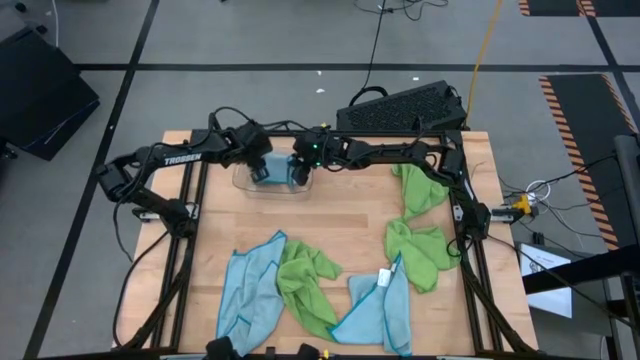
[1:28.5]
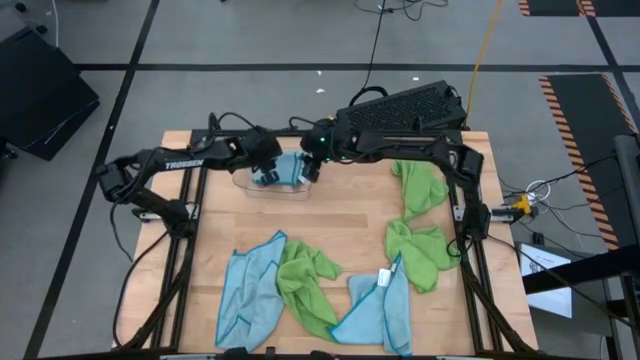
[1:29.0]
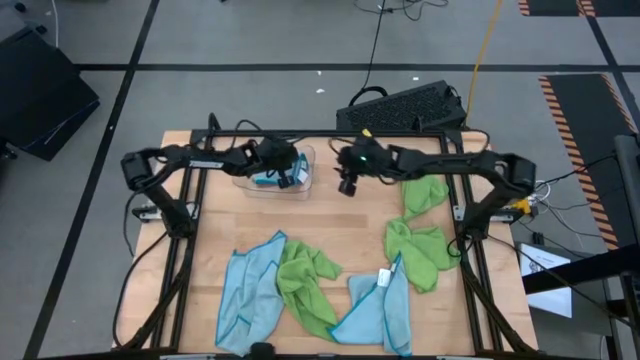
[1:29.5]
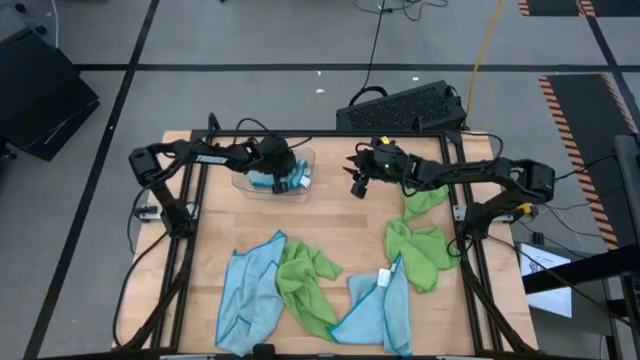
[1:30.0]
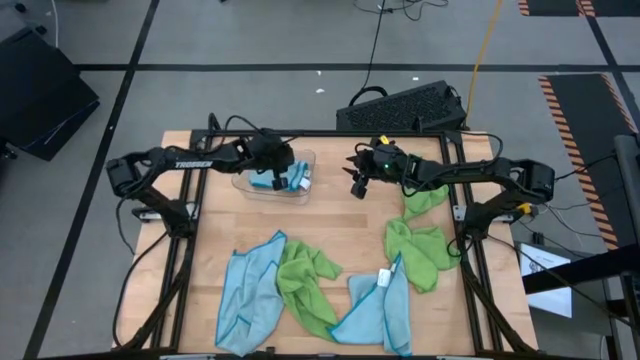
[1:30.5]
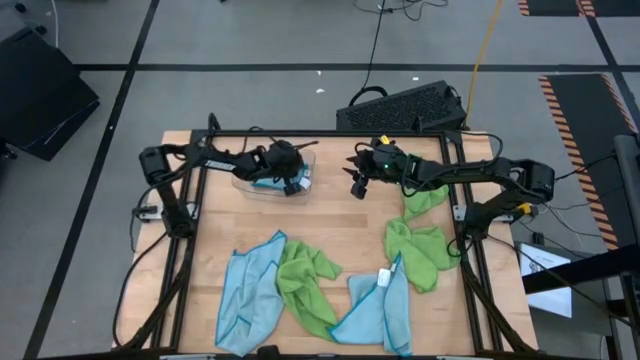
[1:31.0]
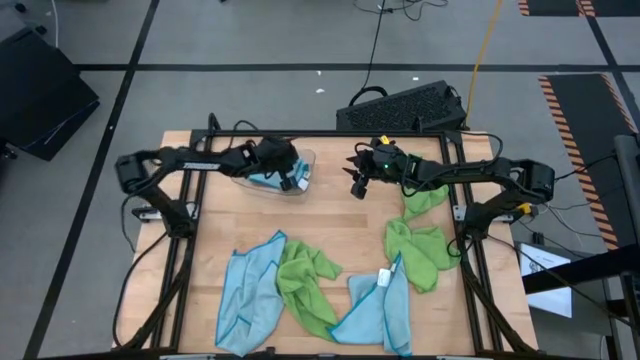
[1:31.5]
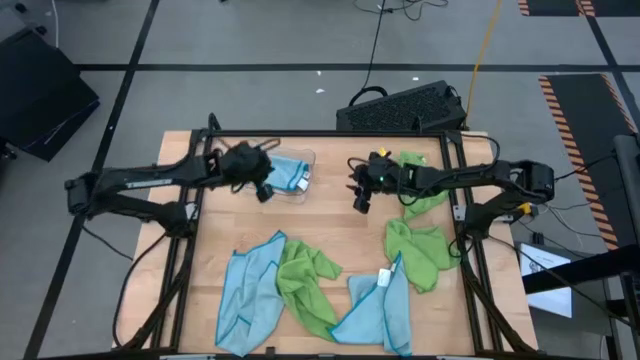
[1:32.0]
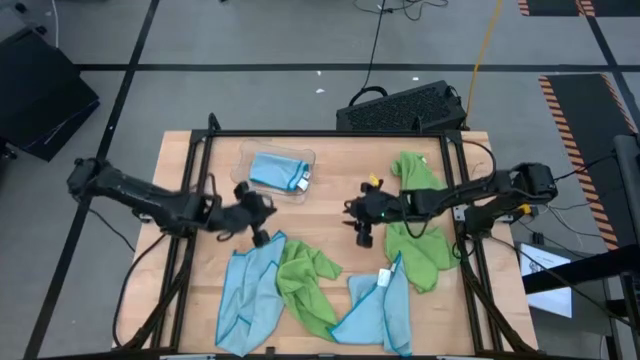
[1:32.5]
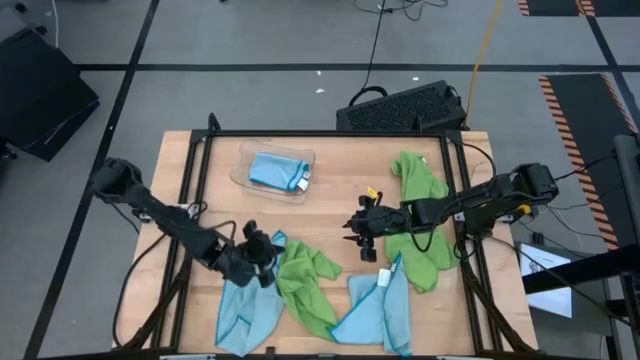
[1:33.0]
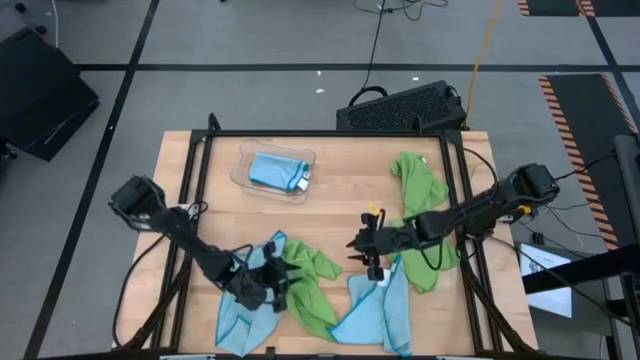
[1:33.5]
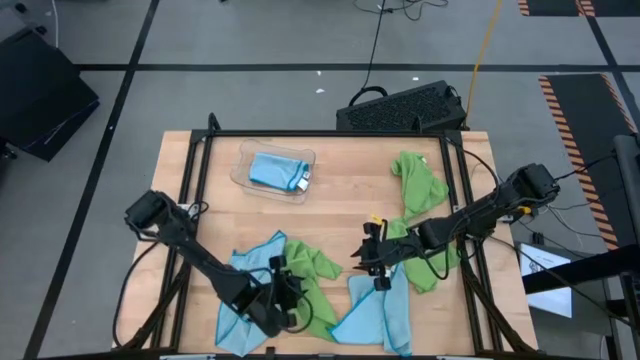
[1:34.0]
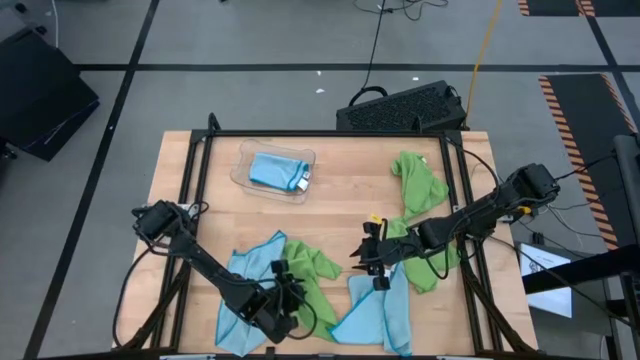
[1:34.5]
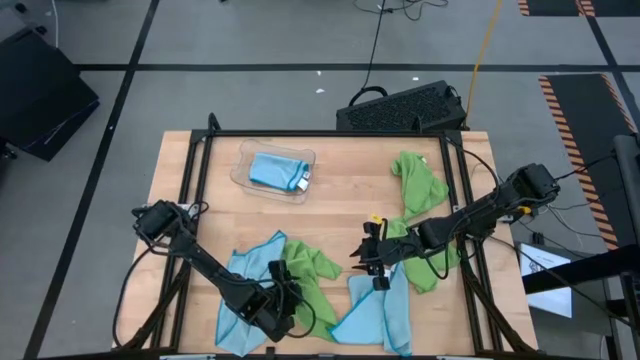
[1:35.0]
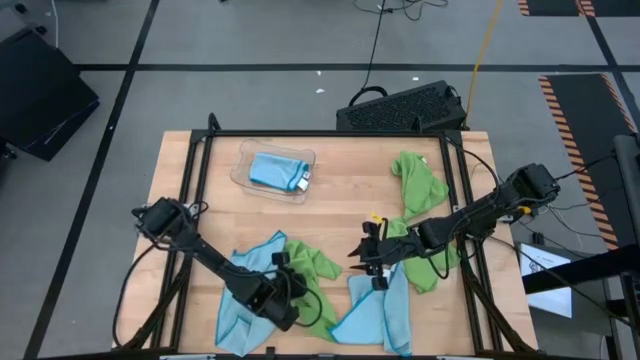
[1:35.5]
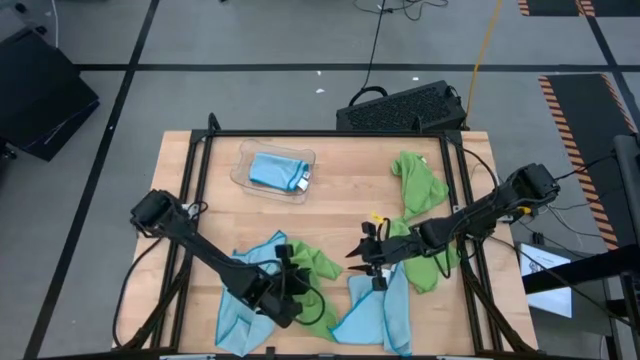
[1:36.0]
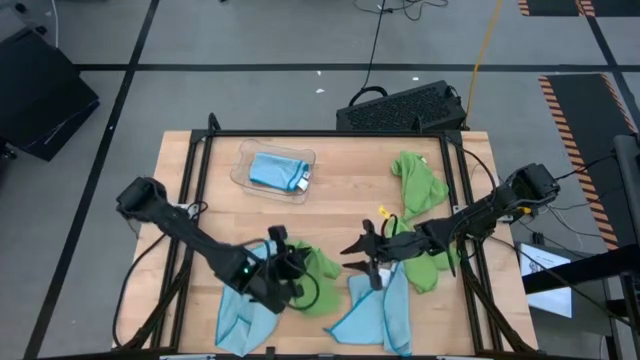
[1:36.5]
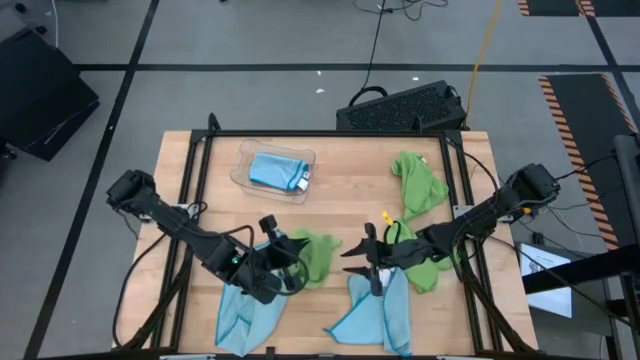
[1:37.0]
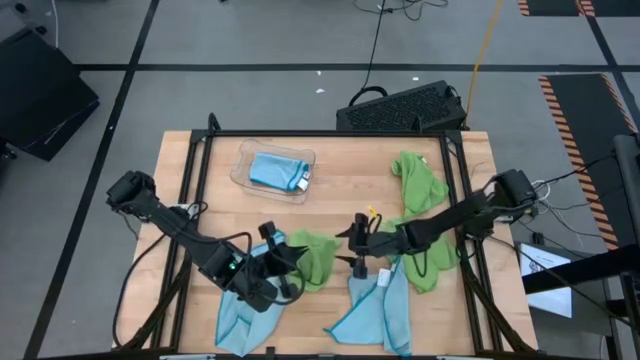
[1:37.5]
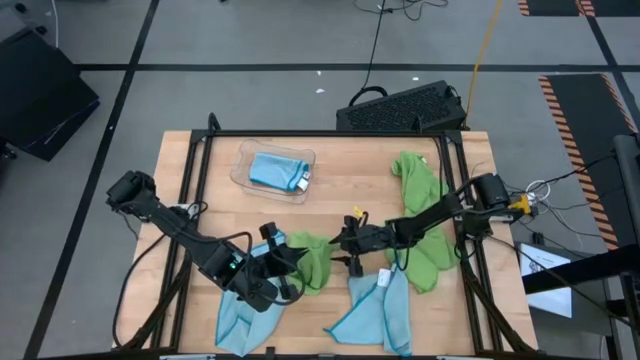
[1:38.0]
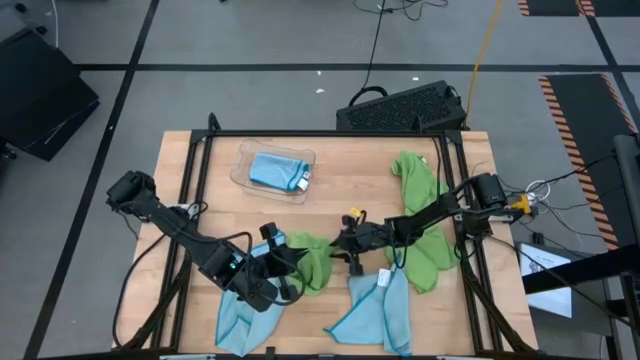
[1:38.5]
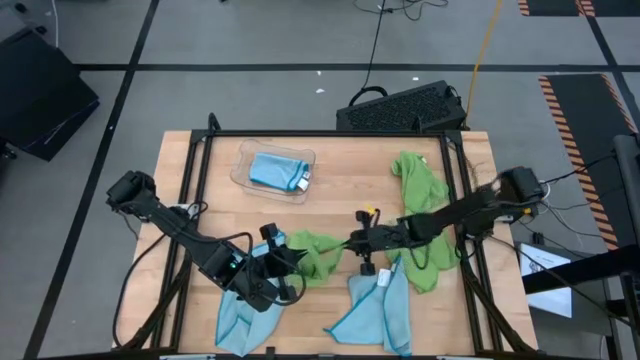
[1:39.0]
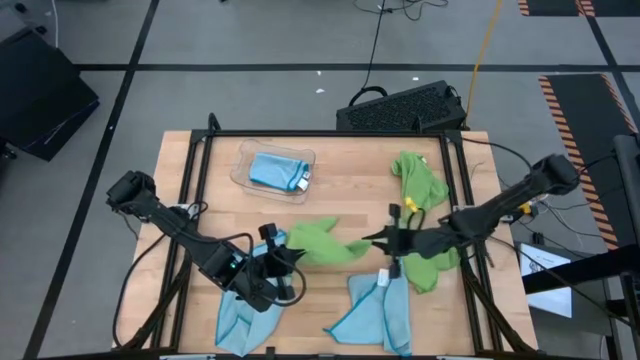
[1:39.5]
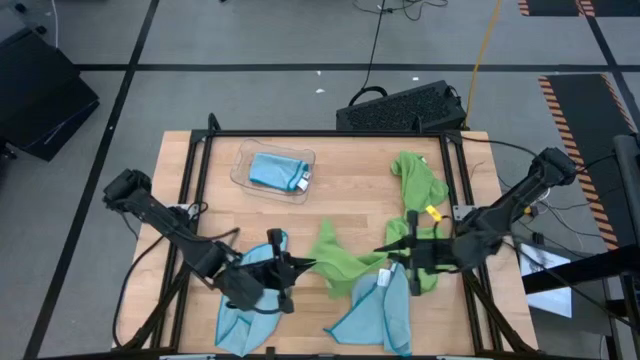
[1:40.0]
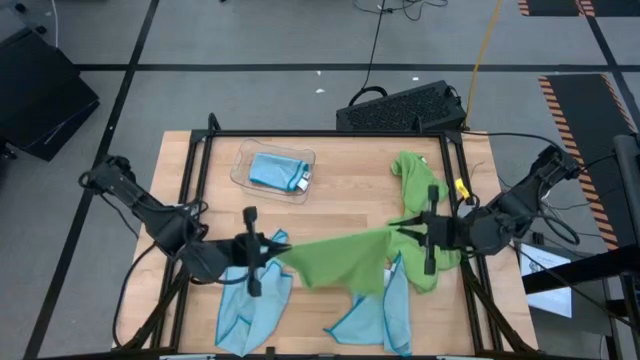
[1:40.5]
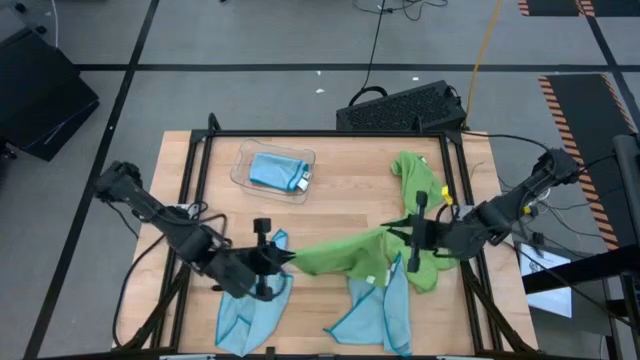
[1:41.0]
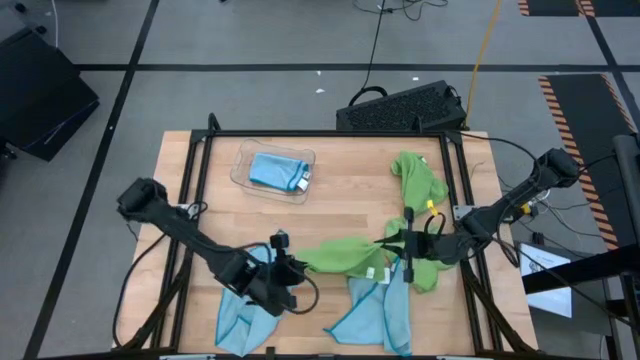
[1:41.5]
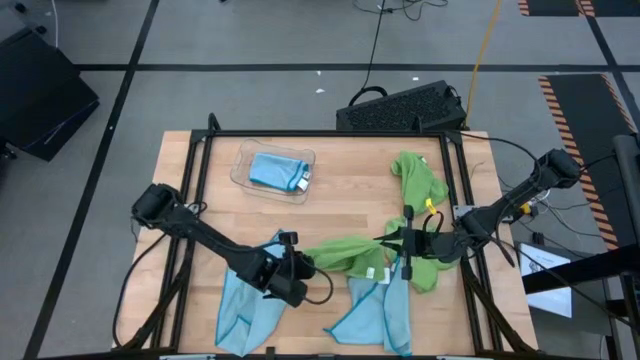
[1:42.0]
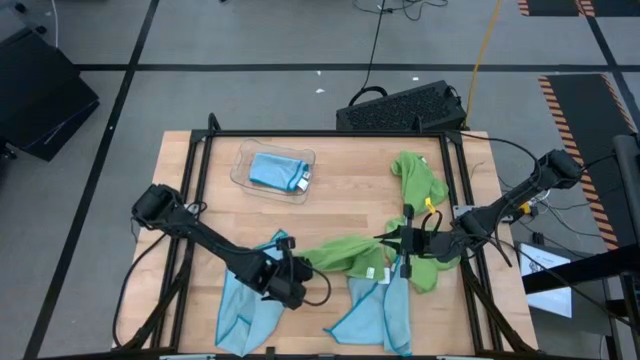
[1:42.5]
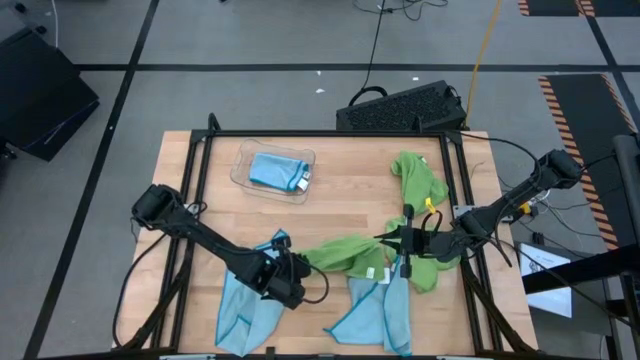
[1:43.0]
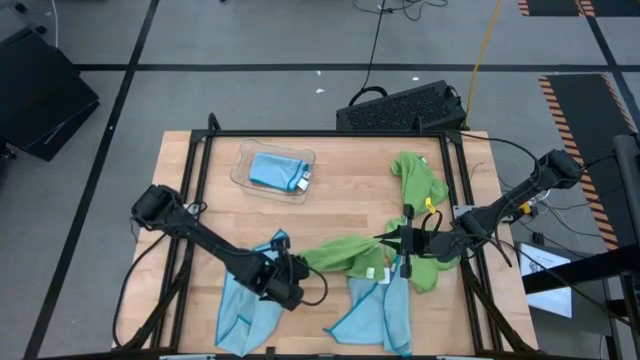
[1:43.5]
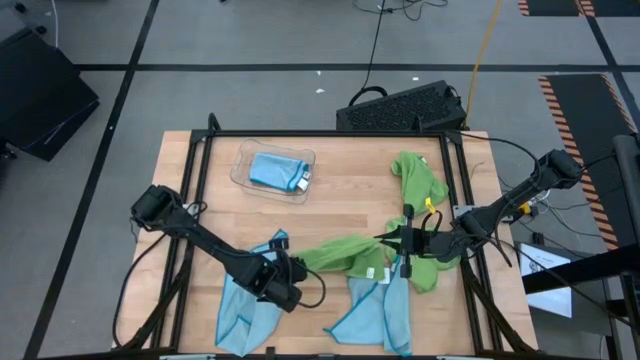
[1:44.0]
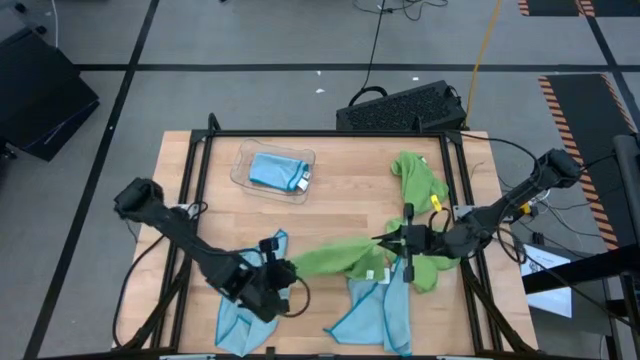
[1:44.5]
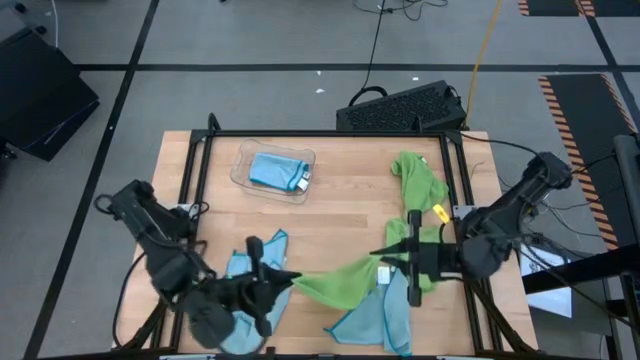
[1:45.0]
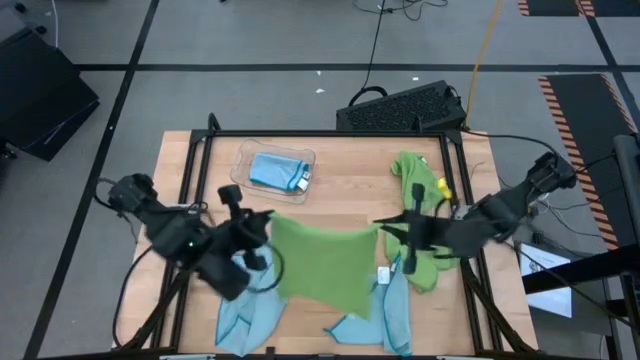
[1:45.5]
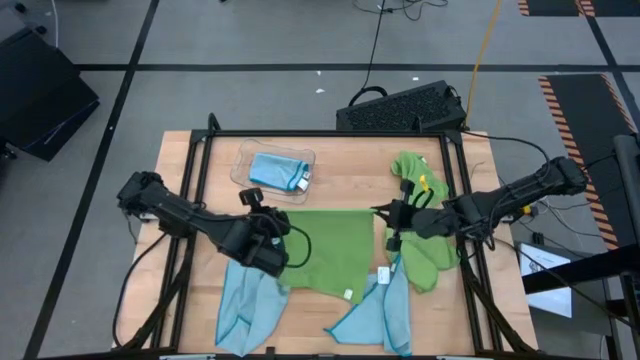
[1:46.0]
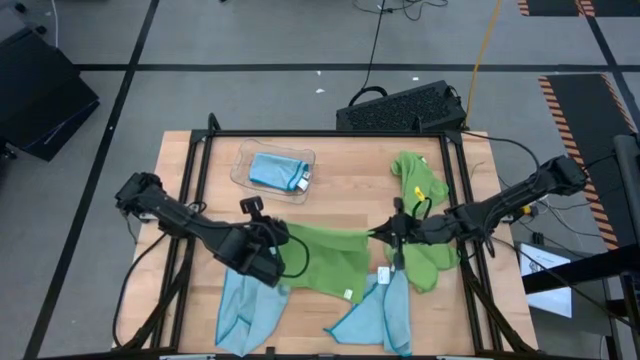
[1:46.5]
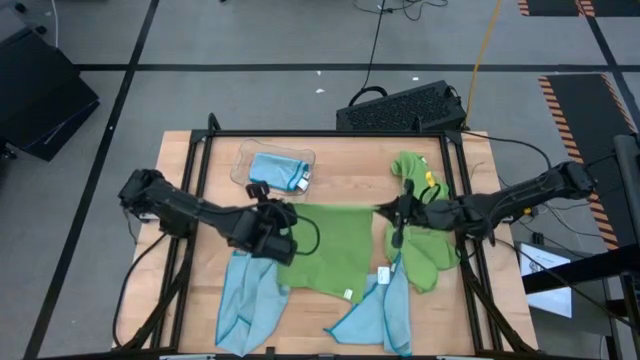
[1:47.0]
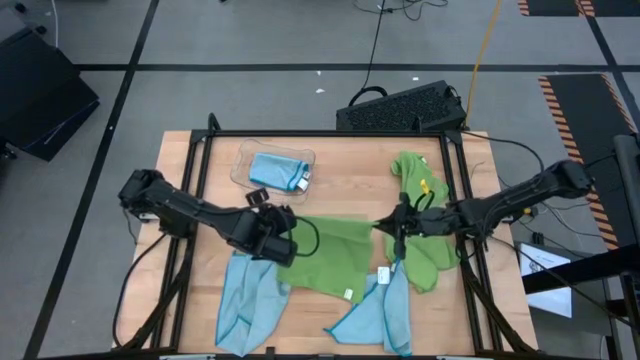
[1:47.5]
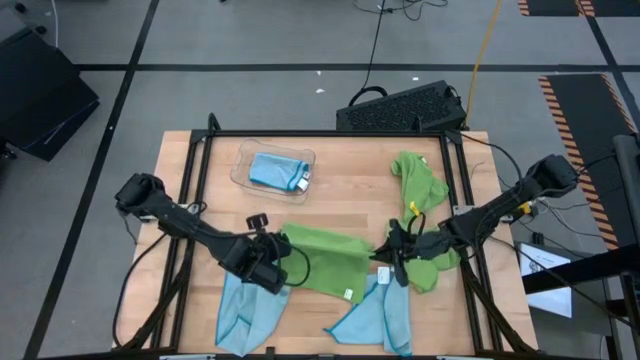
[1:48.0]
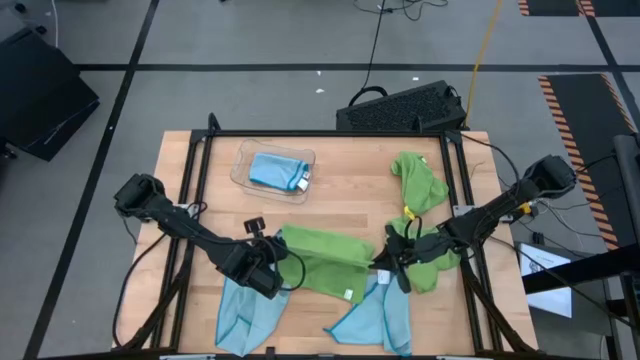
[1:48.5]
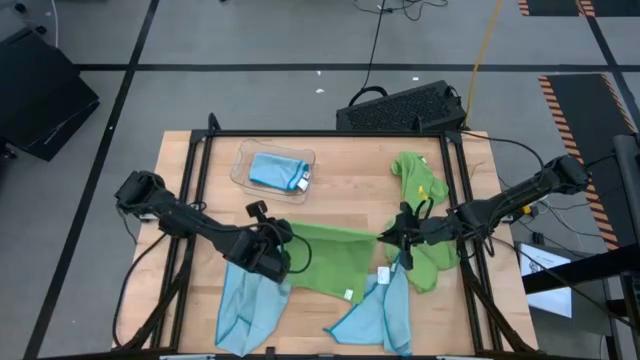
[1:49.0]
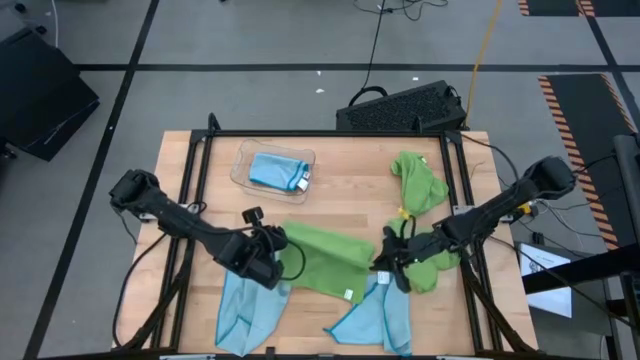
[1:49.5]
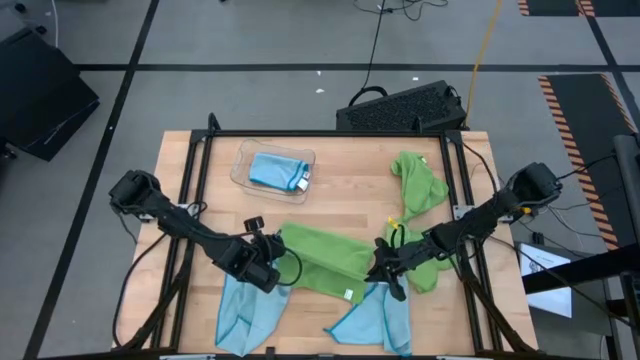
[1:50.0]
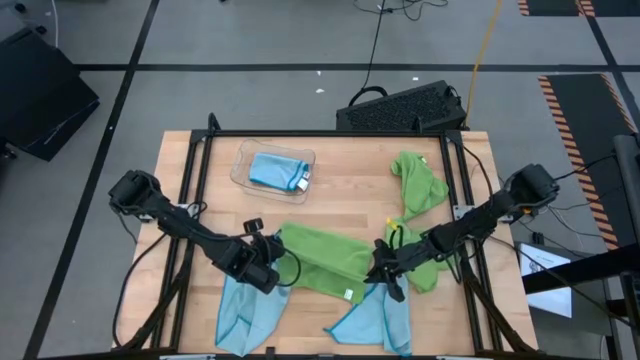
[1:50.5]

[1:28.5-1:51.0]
Task: Fold microfiber towels
Fold the bottom left green microfiber cloth
